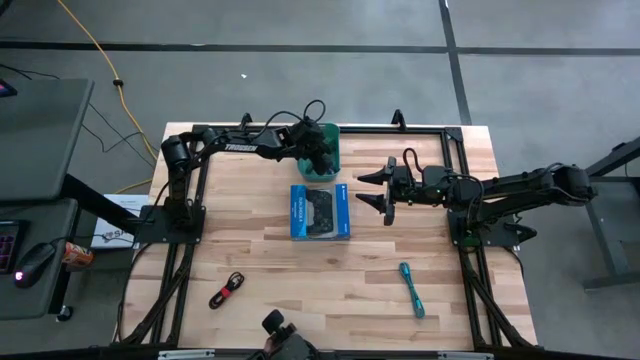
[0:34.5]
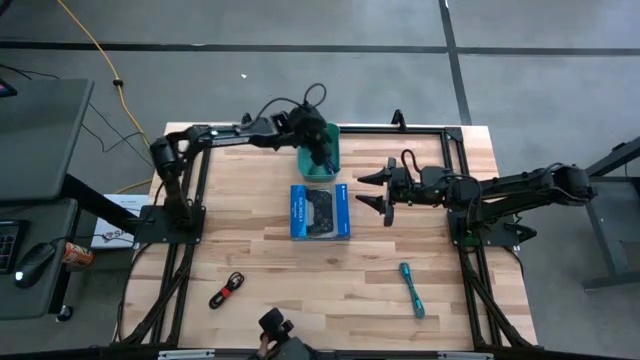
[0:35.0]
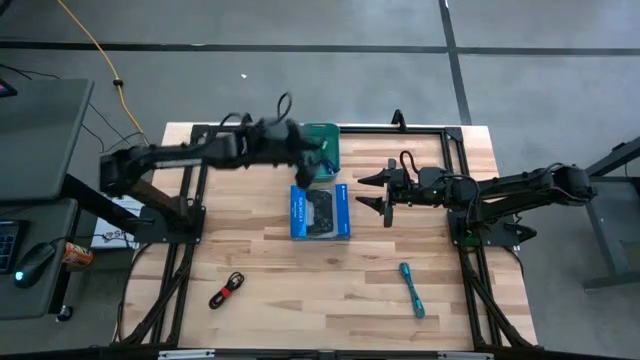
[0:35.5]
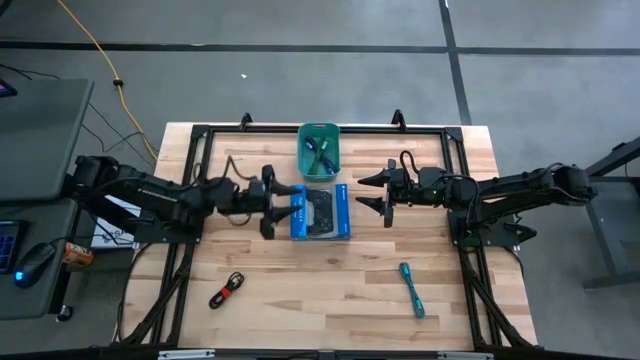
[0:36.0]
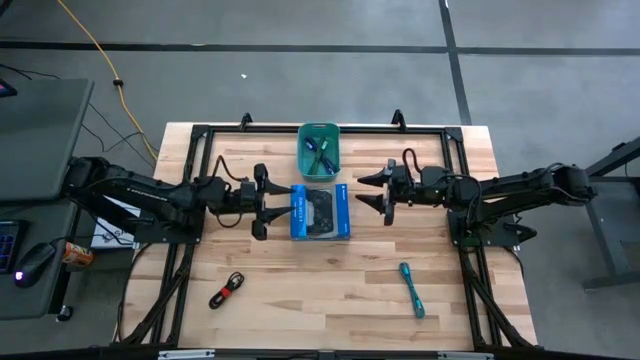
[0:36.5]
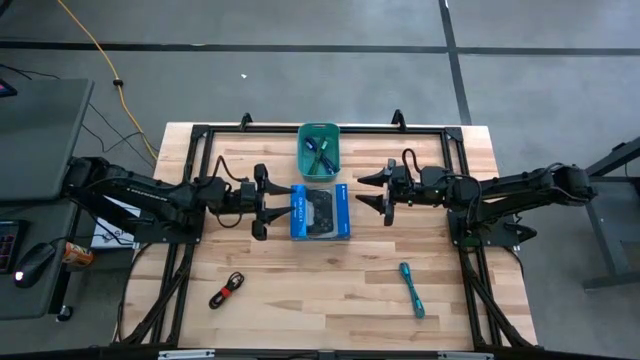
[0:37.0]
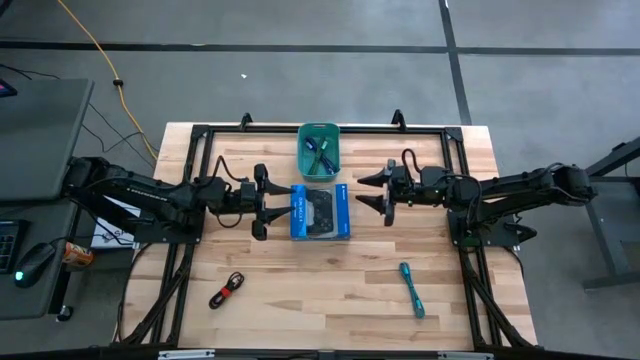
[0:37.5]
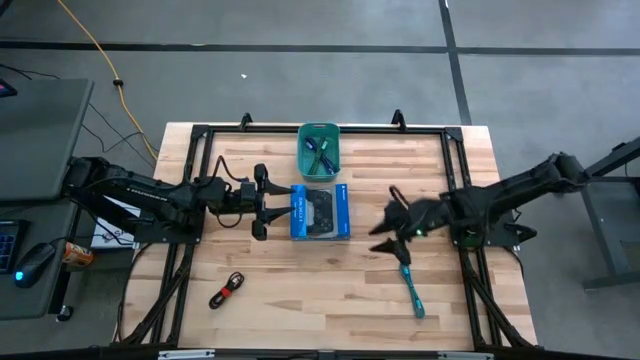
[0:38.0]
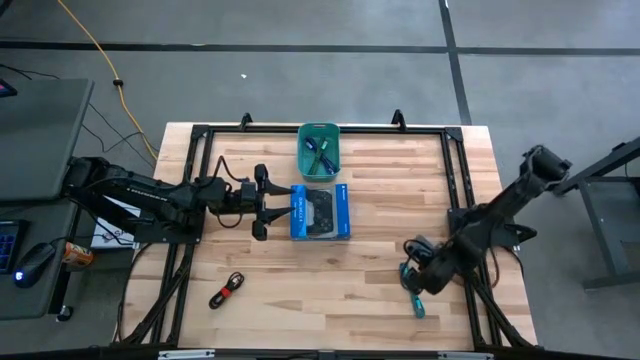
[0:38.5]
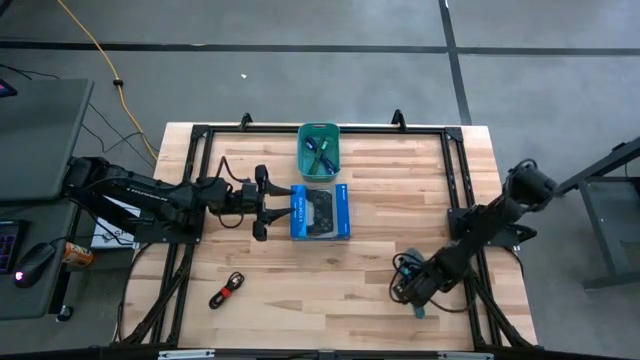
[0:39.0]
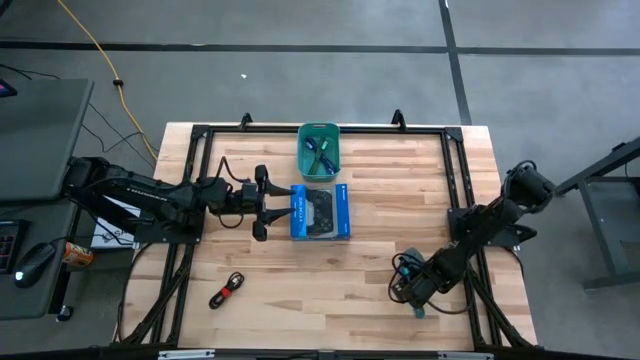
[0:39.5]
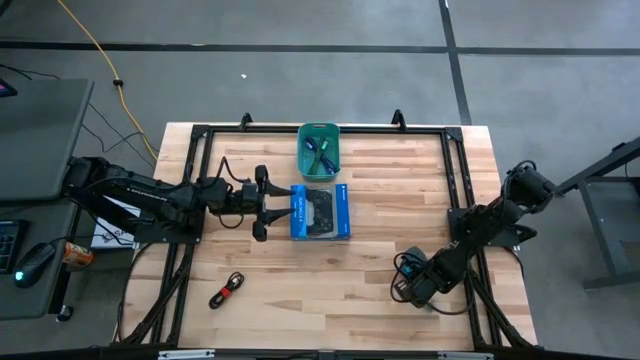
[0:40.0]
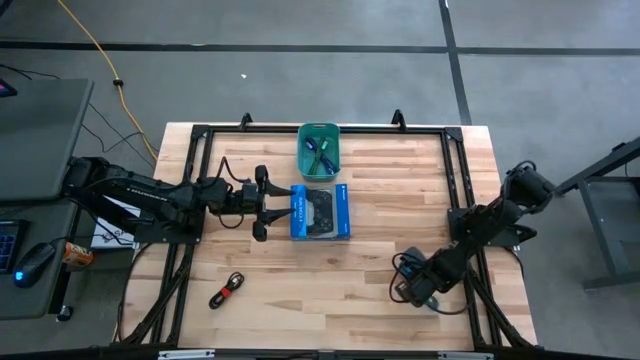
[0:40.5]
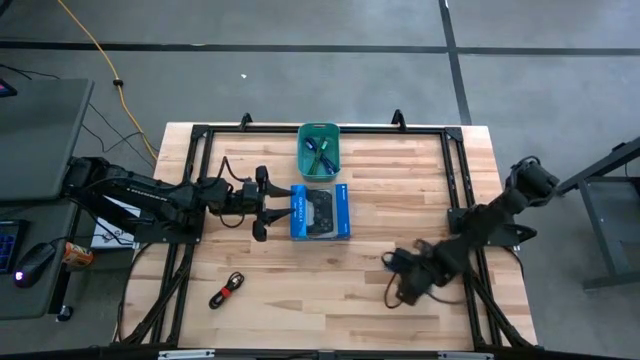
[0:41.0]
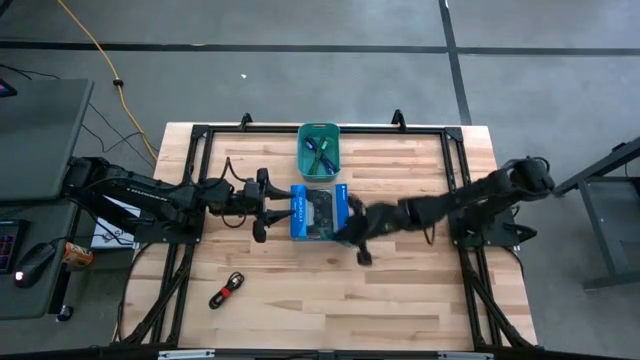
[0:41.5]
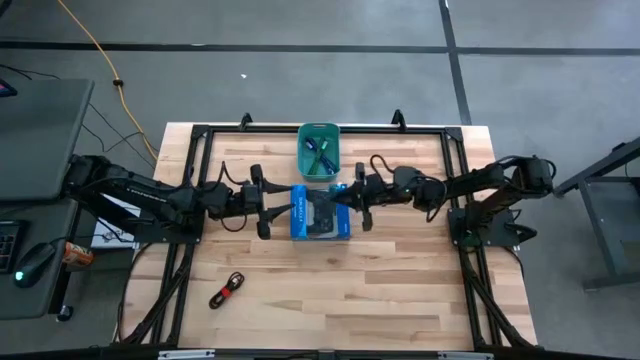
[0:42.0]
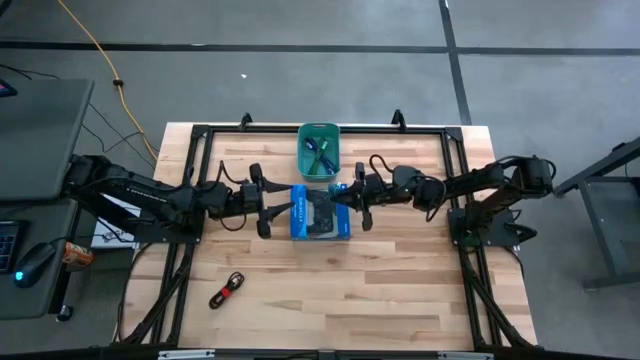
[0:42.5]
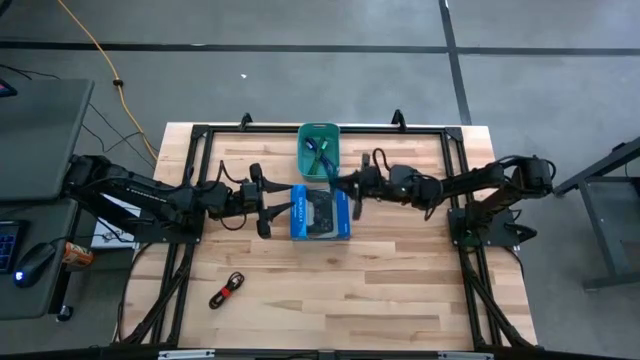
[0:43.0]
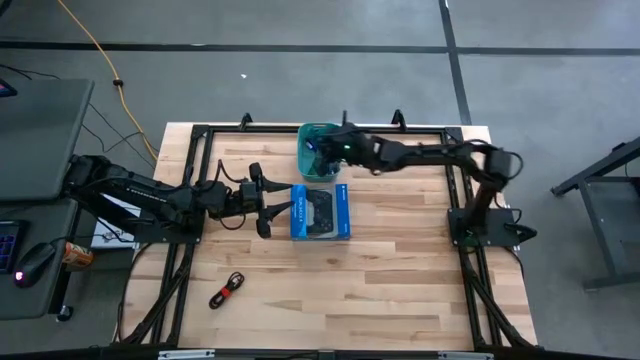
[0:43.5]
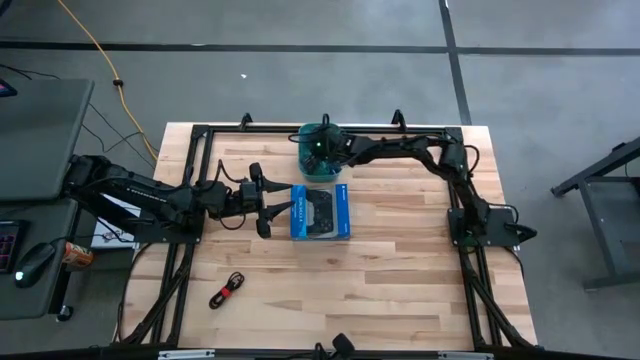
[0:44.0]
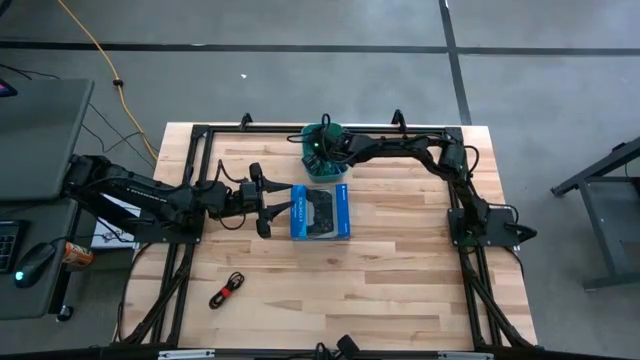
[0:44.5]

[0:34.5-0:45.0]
Task: Pick and place USB-C Cables
Put the blue charger cable into the light blue bin

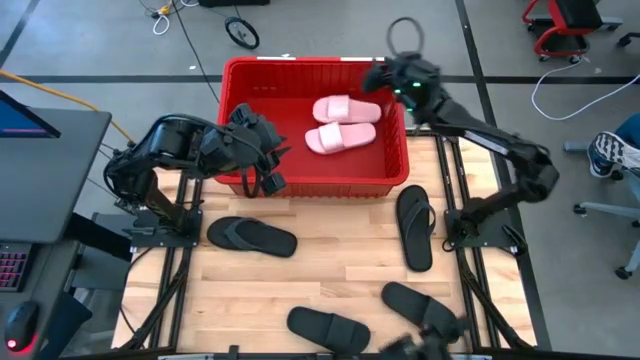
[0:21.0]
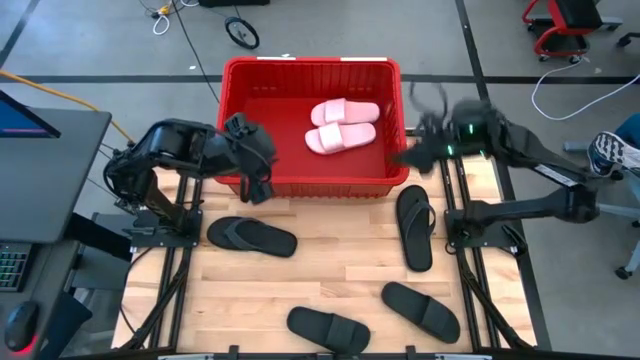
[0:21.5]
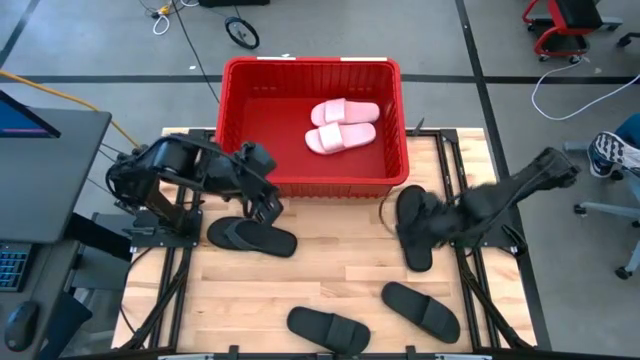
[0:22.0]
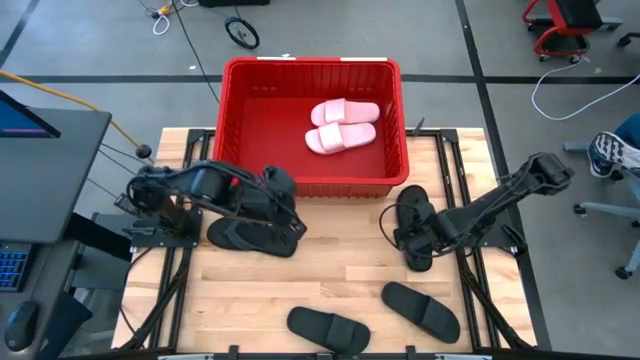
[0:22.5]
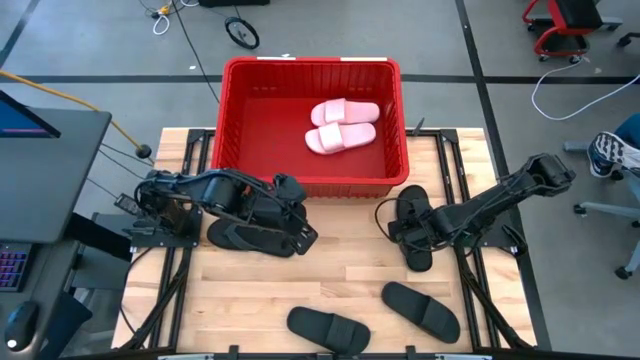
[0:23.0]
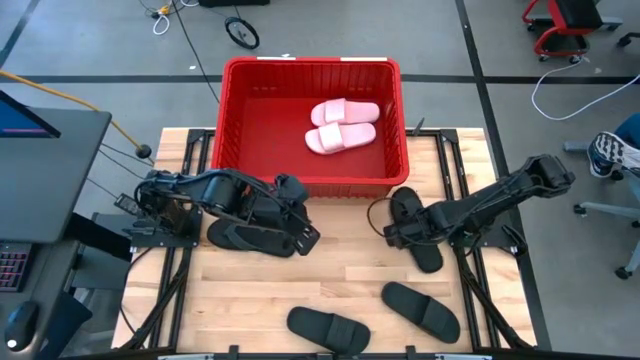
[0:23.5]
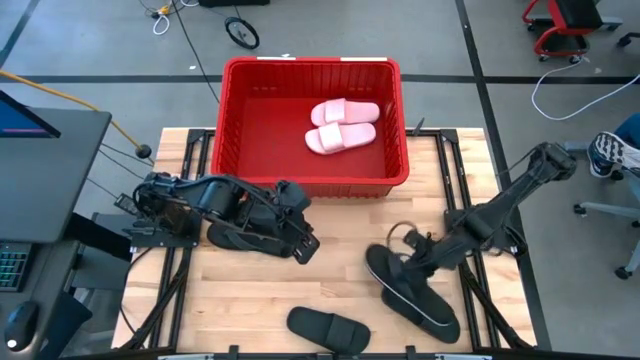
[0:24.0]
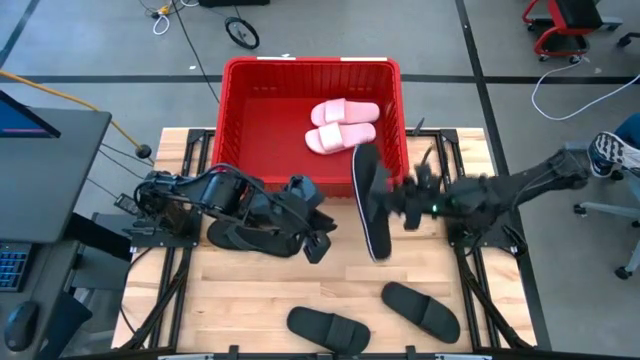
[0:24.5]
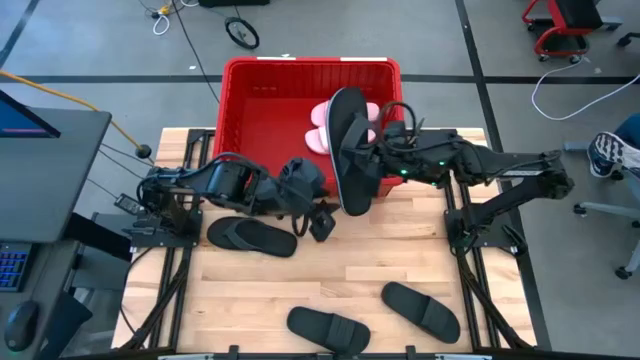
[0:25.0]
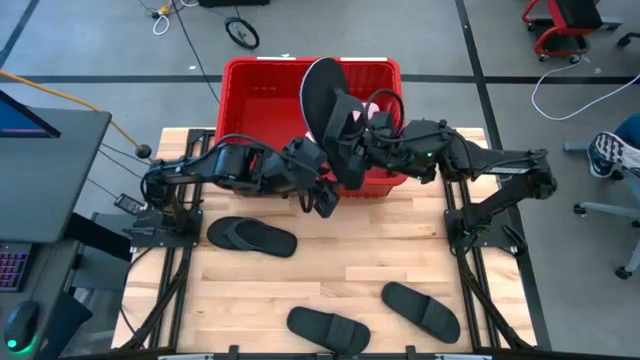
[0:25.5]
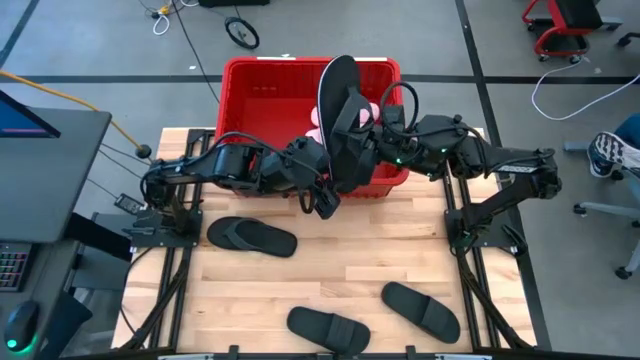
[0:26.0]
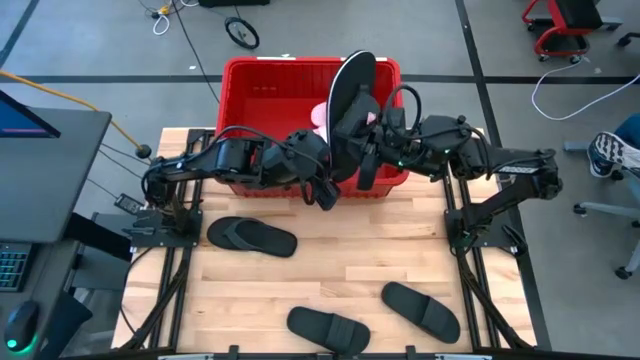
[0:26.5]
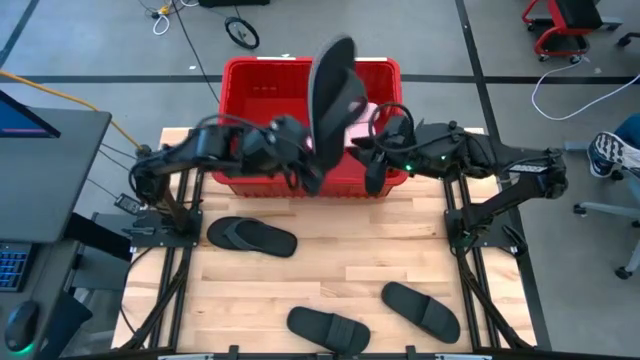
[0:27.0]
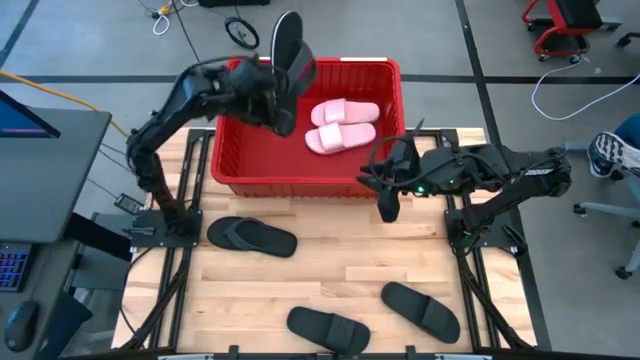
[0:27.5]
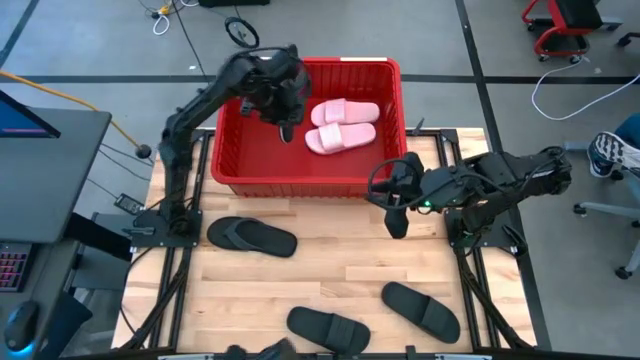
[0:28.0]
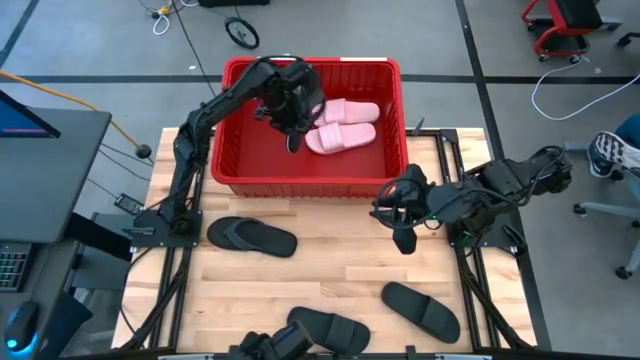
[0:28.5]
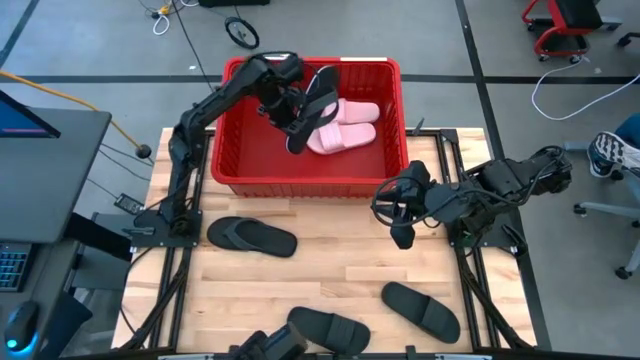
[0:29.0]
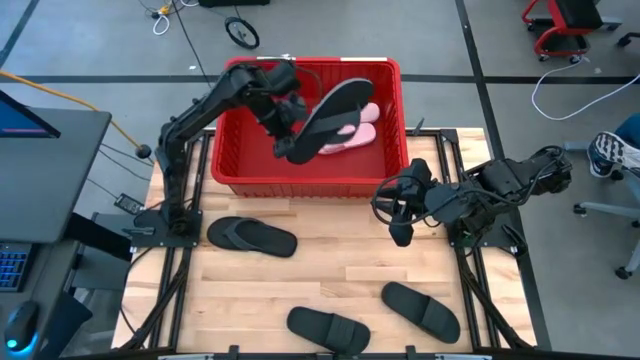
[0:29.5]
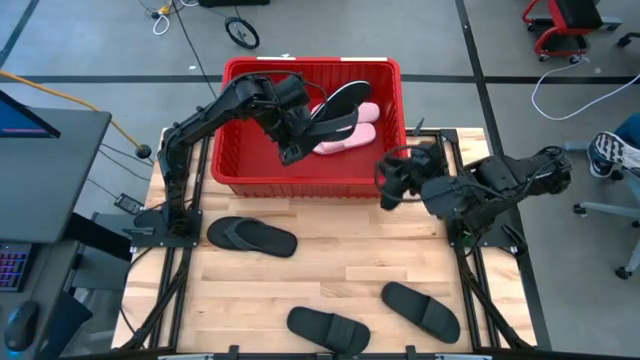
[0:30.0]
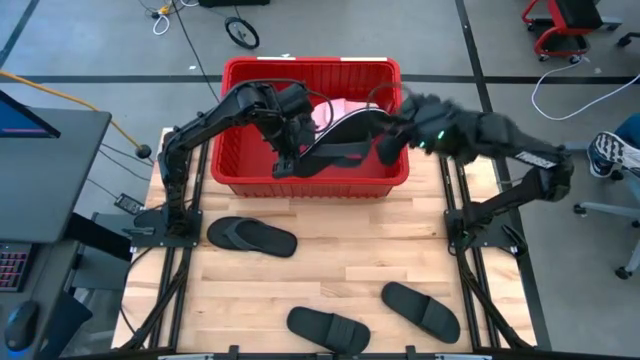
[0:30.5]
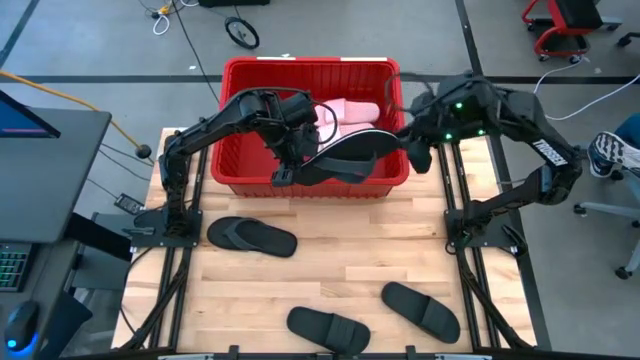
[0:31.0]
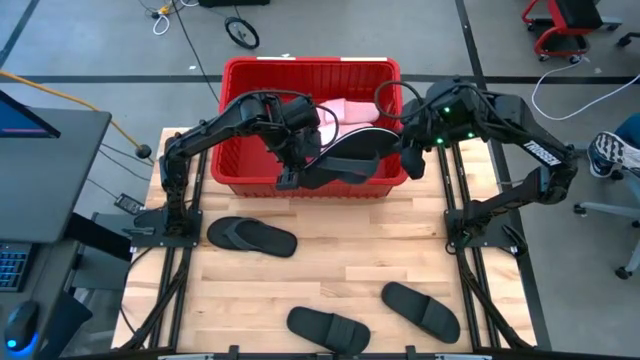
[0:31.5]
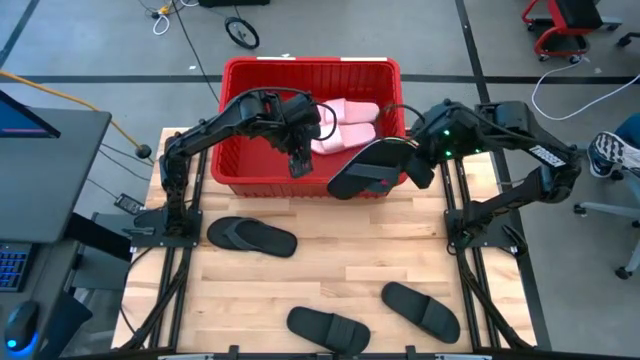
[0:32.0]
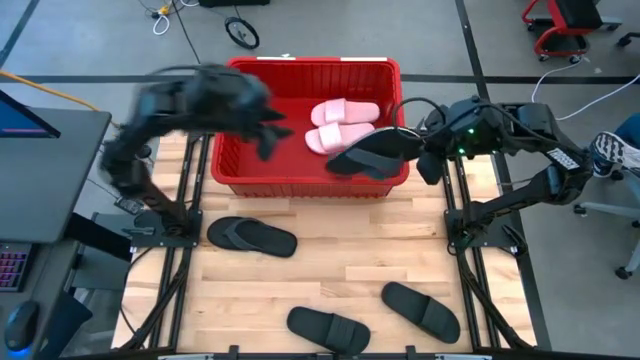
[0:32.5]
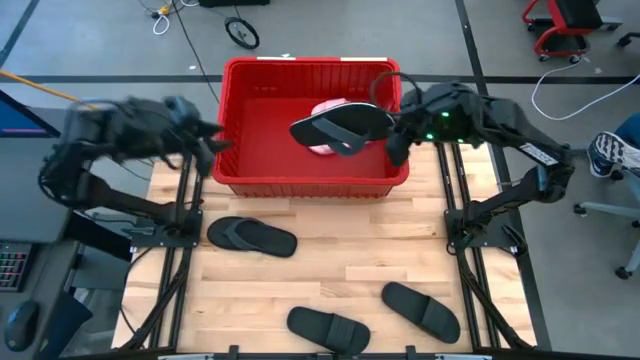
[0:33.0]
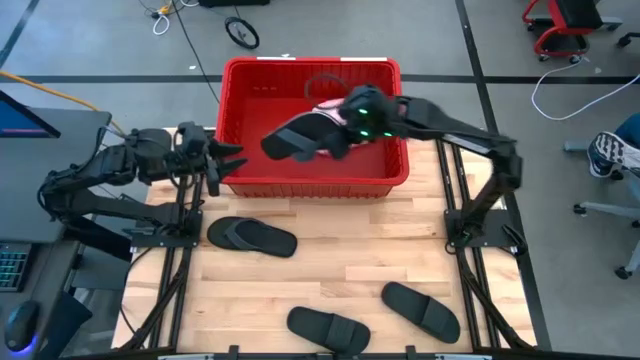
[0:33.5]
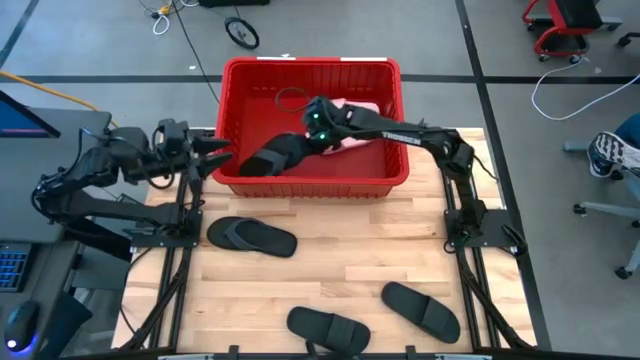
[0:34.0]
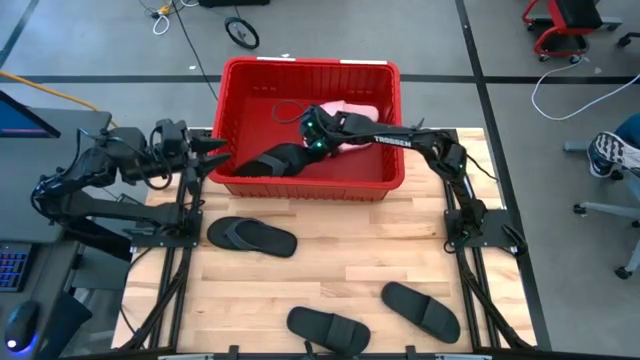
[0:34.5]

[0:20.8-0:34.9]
Task: Pick and place slides into bin
Put the black slide into the red bin
